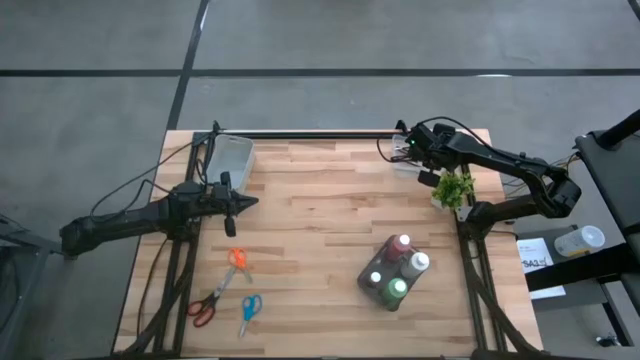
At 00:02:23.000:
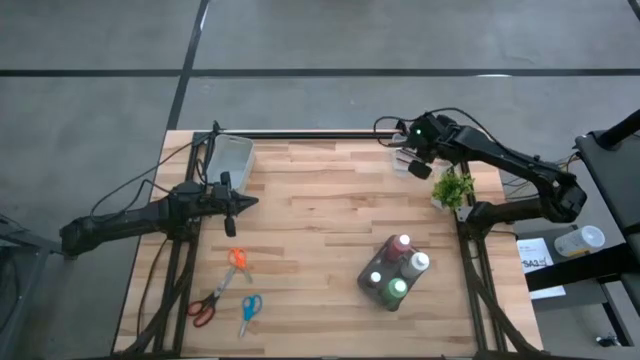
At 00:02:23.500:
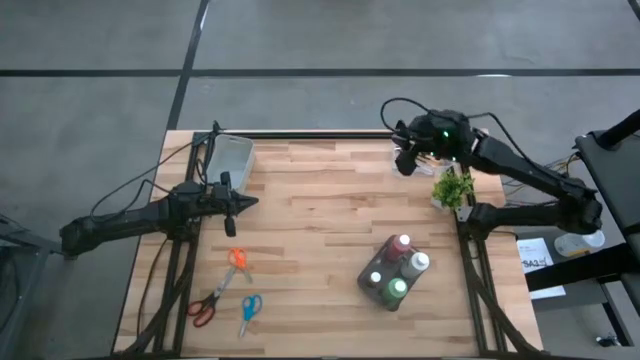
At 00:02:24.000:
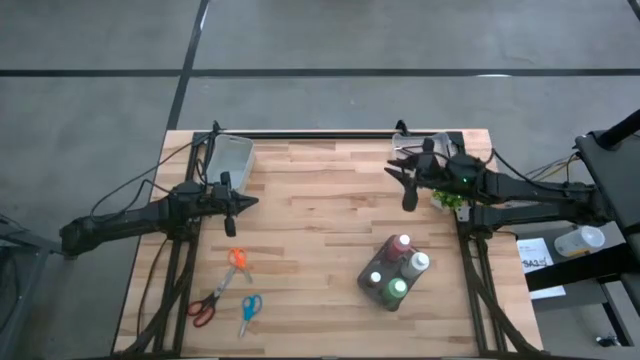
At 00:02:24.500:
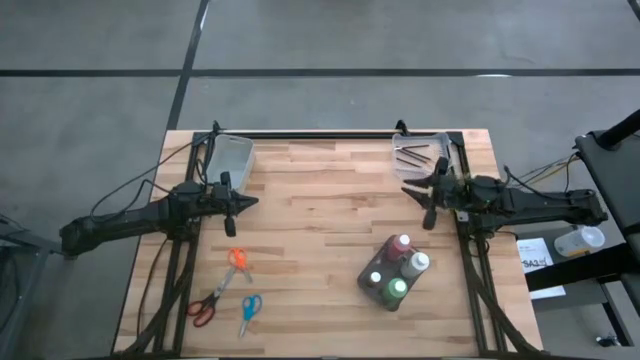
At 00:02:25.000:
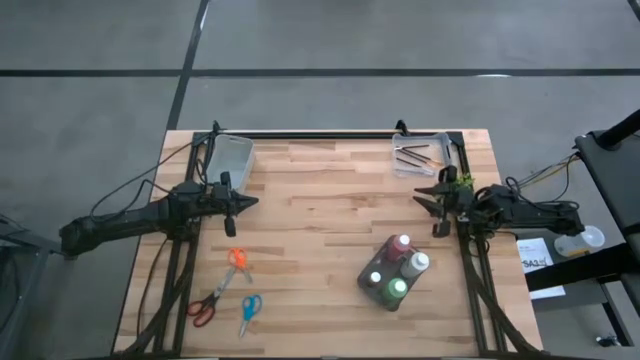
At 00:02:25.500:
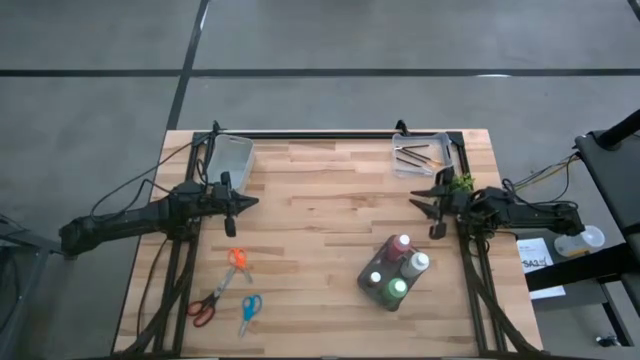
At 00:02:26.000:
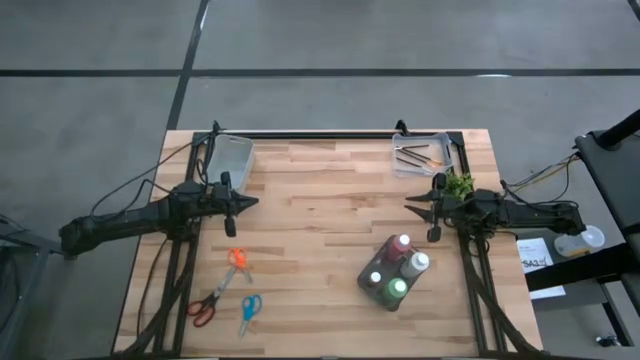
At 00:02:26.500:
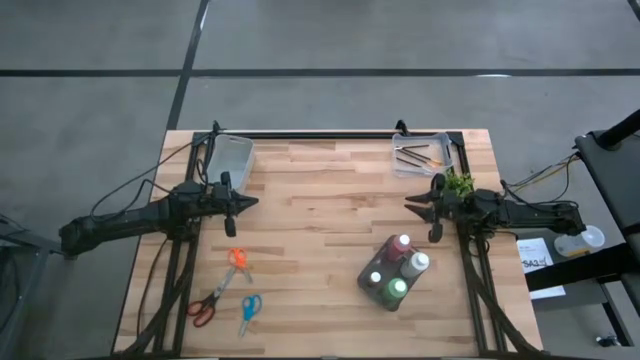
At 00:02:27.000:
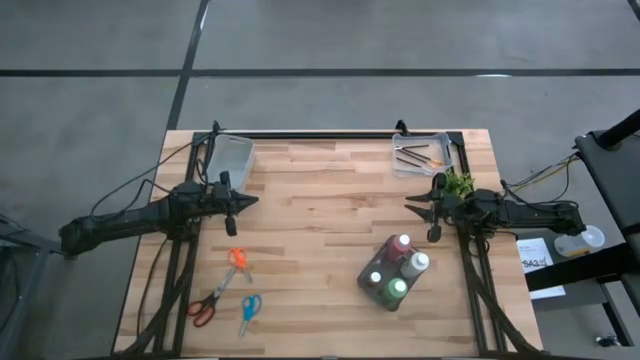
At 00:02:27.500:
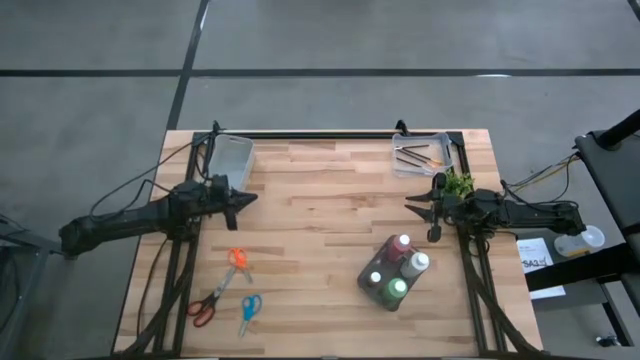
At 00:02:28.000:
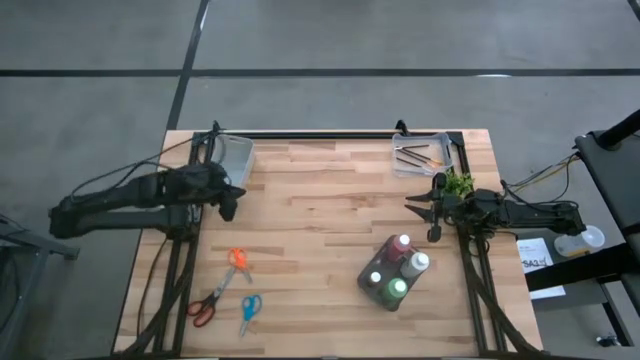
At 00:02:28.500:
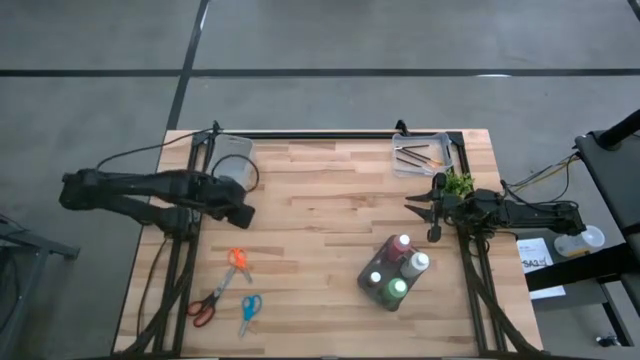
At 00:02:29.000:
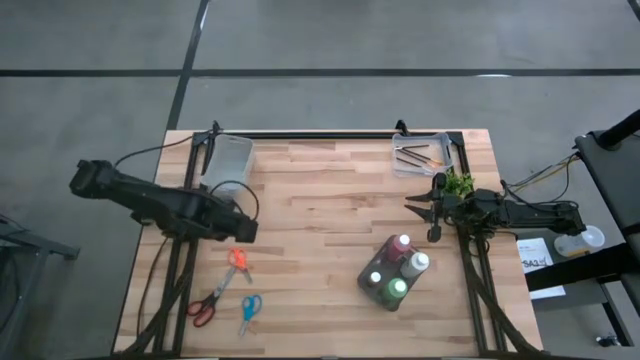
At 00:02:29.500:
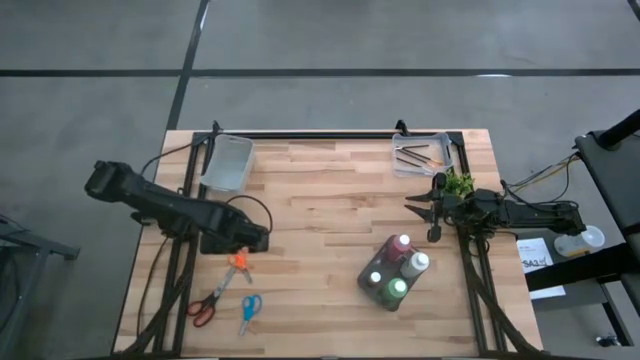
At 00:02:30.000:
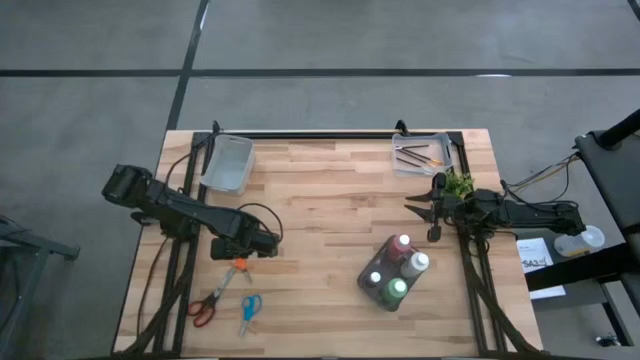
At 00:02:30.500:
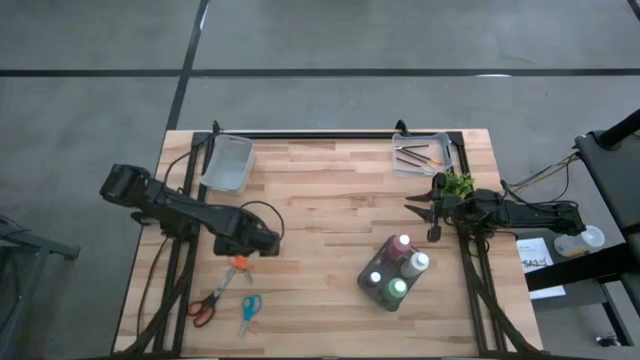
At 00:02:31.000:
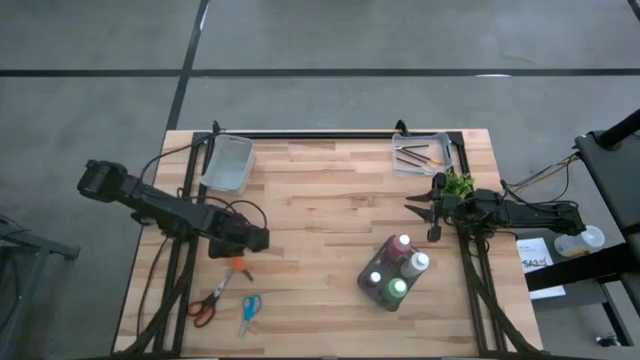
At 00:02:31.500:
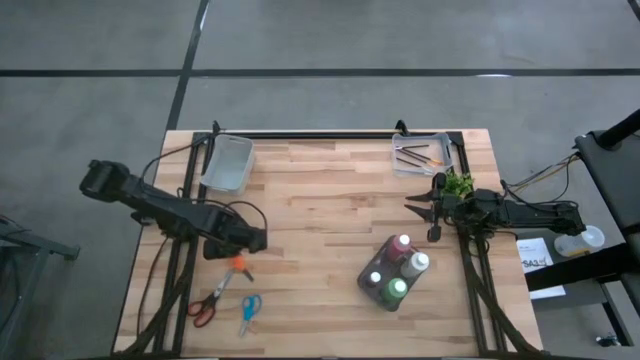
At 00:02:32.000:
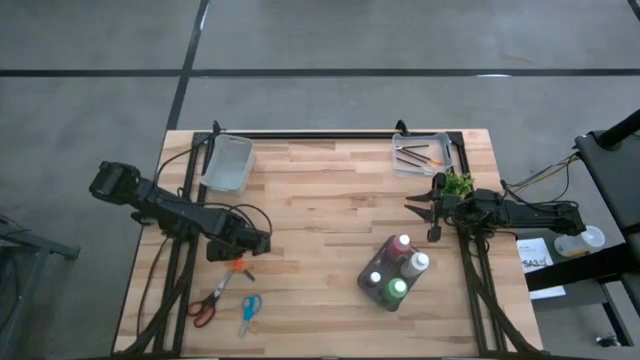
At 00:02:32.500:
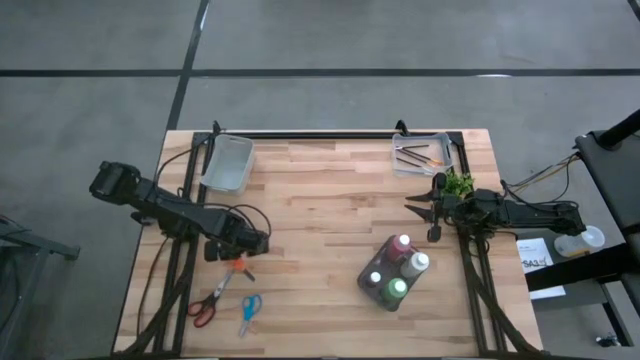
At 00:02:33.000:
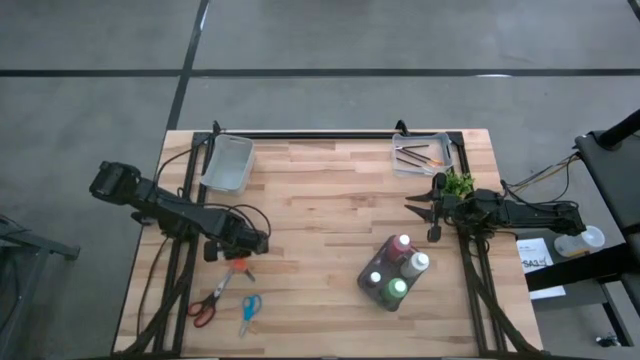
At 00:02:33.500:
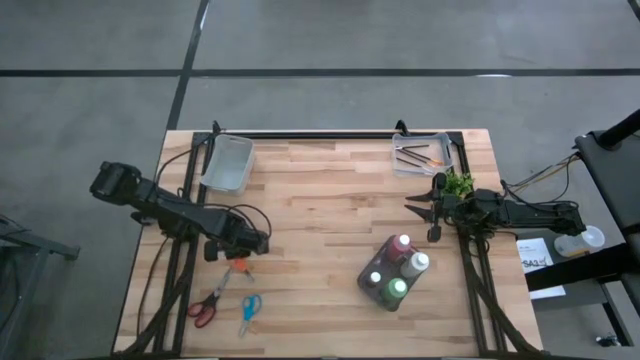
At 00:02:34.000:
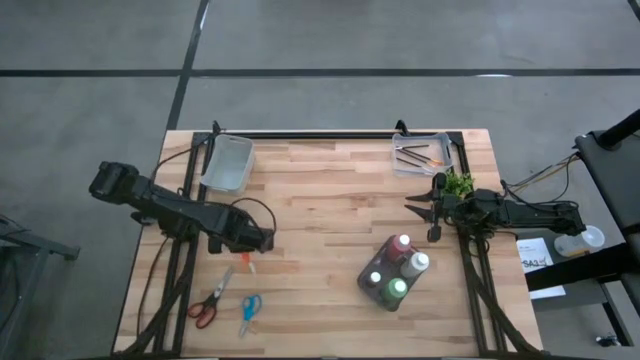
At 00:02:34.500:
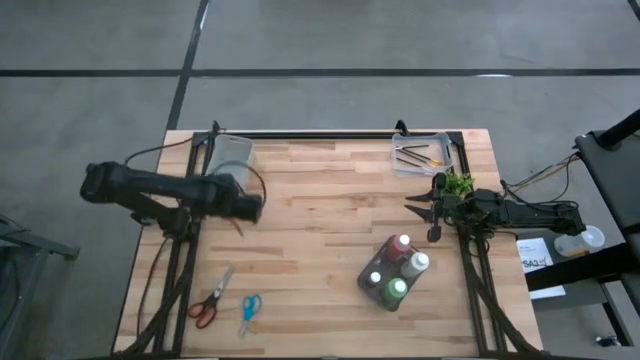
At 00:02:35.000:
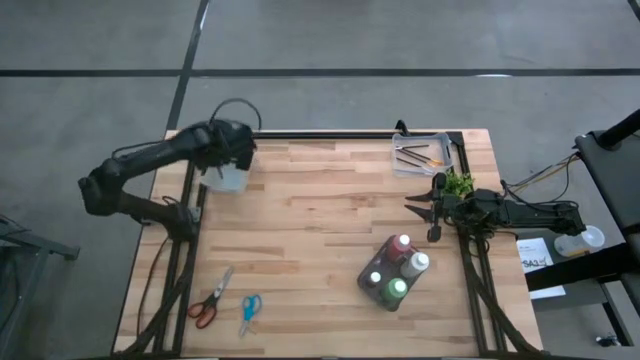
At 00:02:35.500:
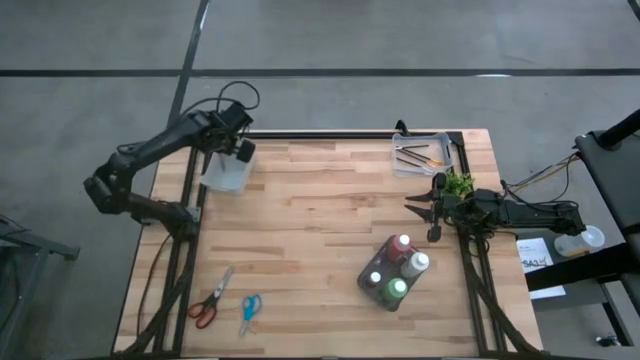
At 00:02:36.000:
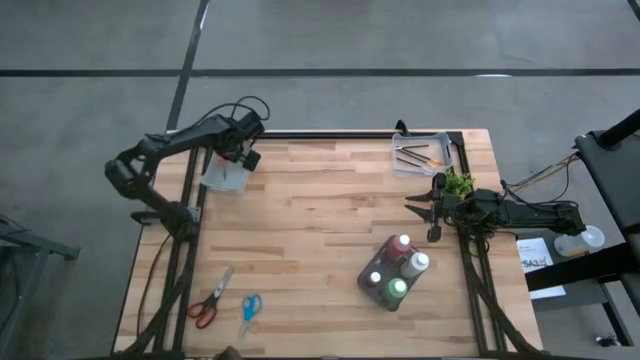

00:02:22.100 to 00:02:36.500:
Task: Pick & Place Paint Supplies
Put the orange scissors into the white bin

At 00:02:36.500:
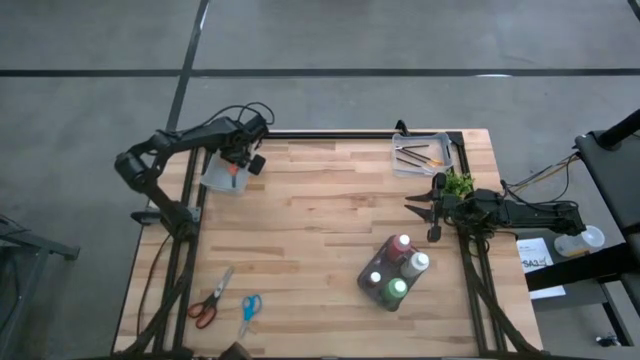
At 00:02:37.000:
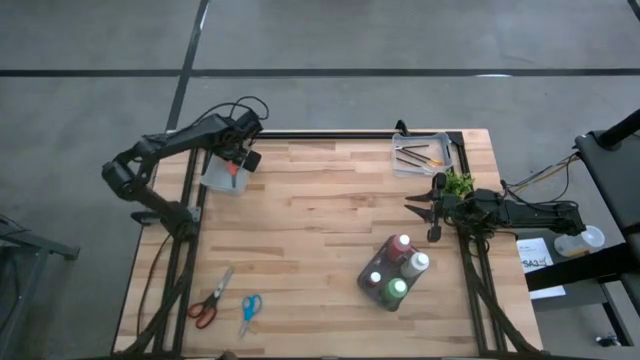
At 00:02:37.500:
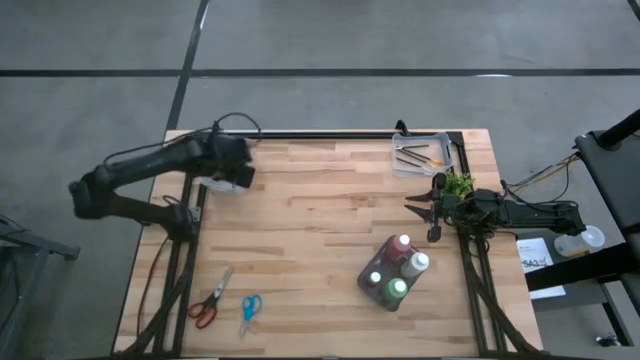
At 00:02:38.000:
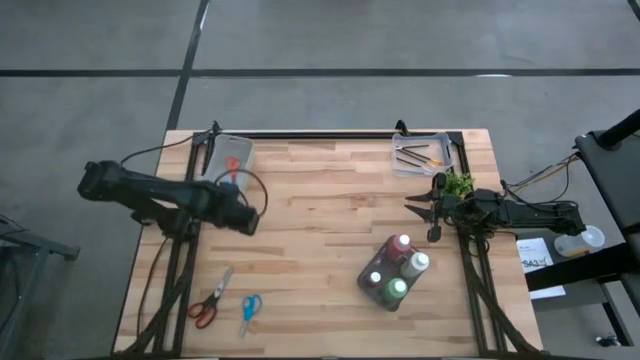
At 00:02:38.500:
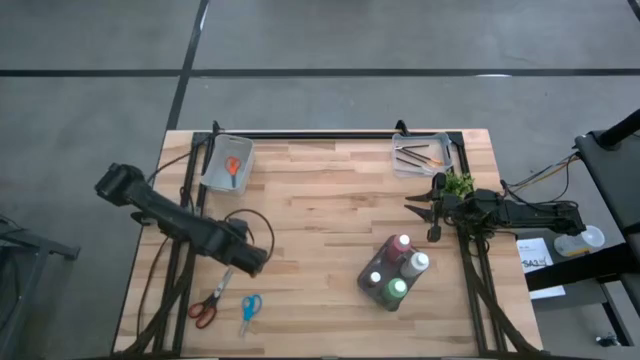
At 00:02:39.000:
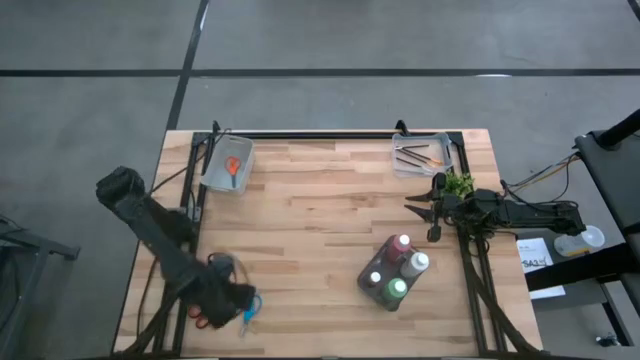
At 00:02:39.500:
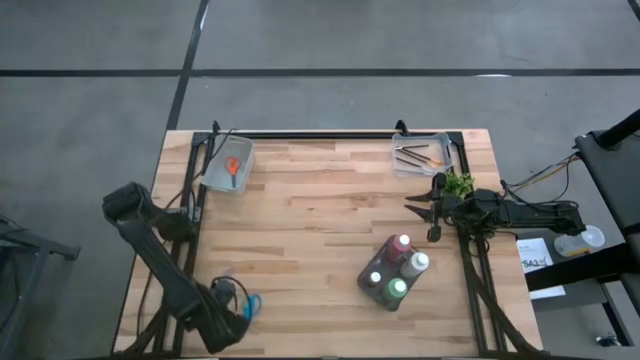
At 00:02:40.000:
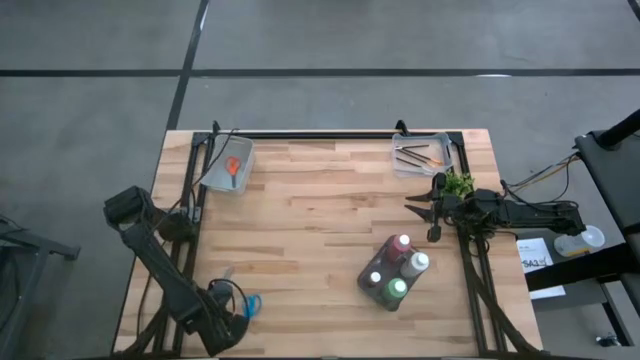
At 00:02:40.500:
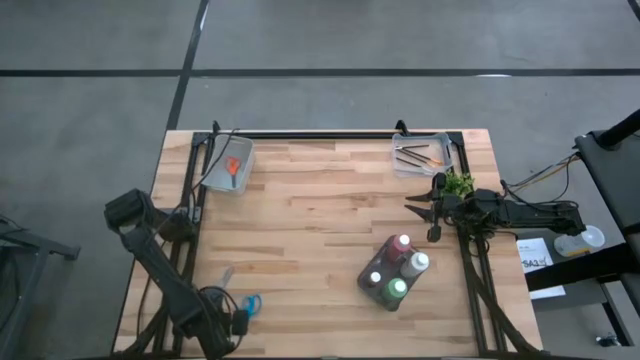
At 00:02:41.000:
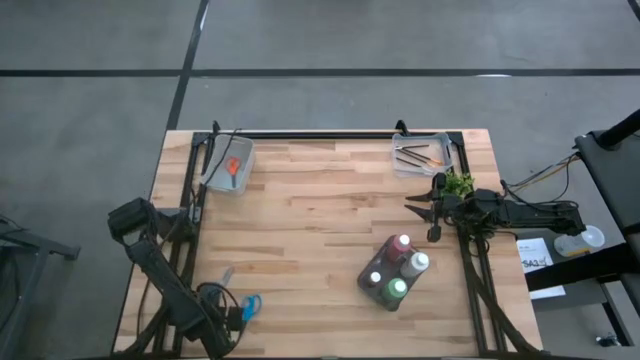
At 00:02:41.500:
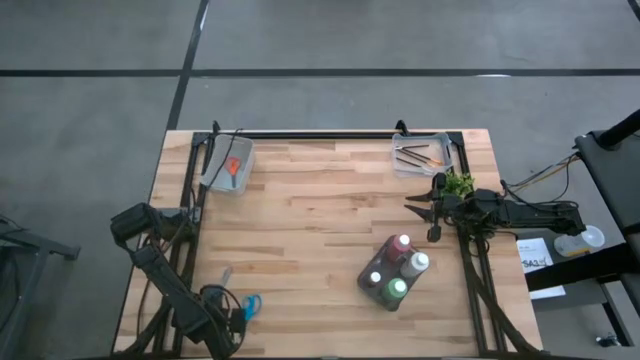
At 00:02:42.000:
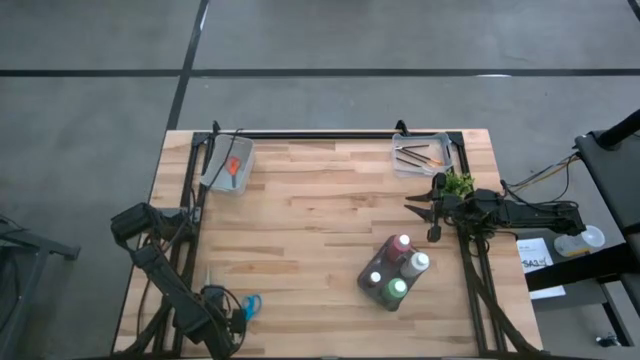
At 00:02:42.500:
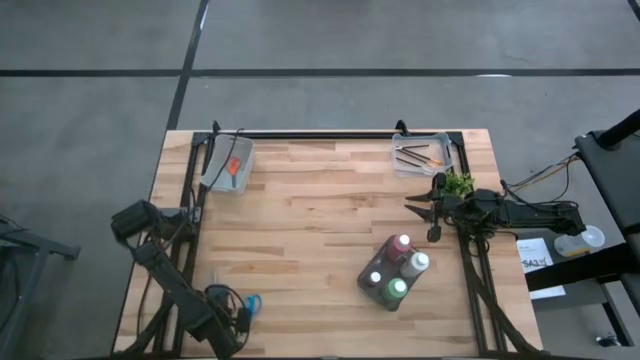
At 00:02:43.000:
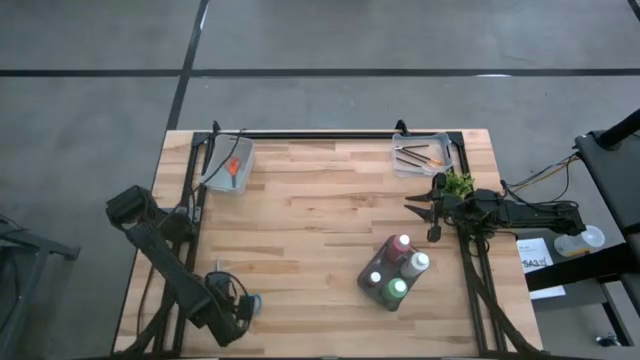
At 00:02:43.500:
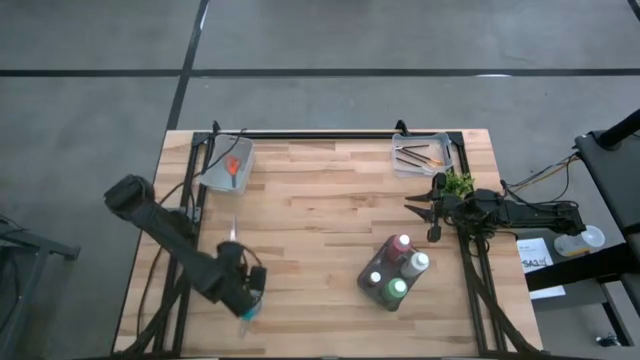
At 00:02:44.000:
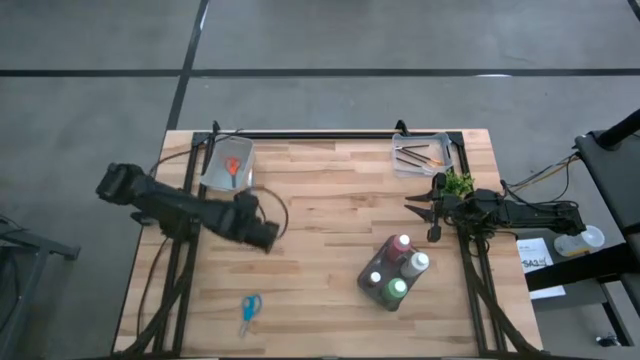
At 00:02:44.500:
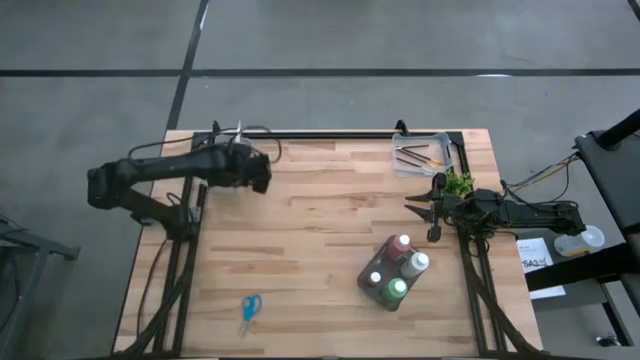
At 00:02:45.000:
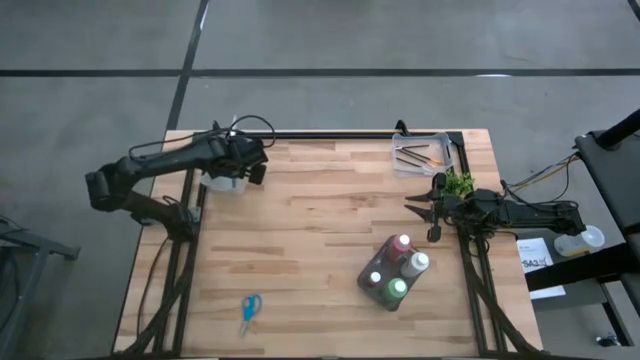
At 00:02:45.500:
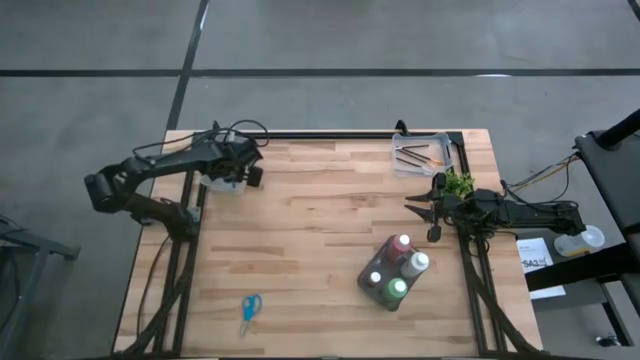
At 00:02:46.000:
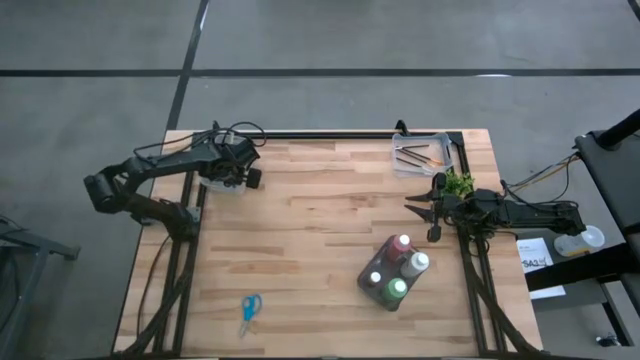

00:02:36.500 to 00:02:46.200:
Put the black scissors into the white bin
